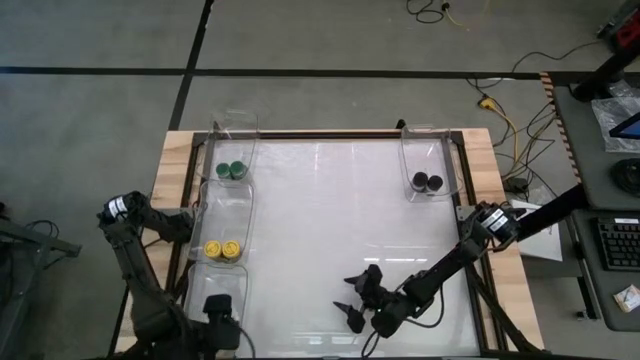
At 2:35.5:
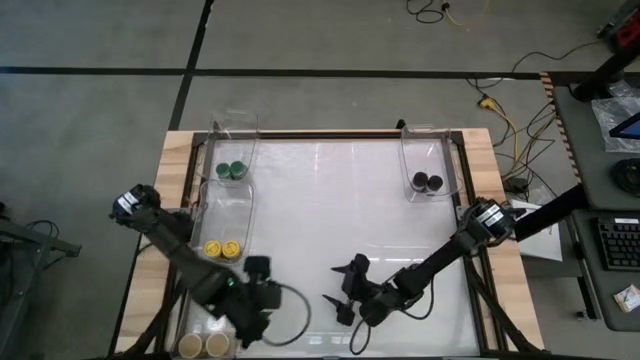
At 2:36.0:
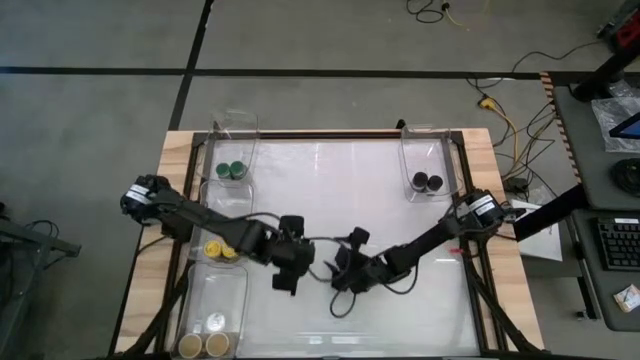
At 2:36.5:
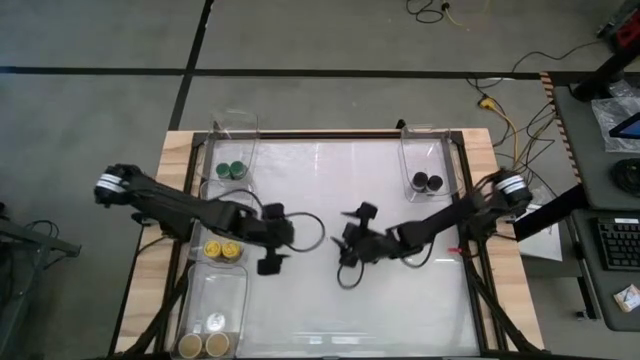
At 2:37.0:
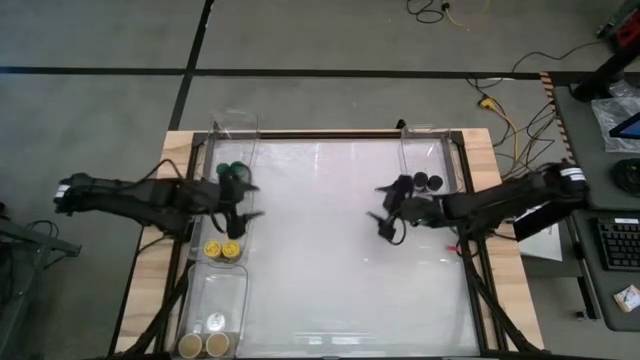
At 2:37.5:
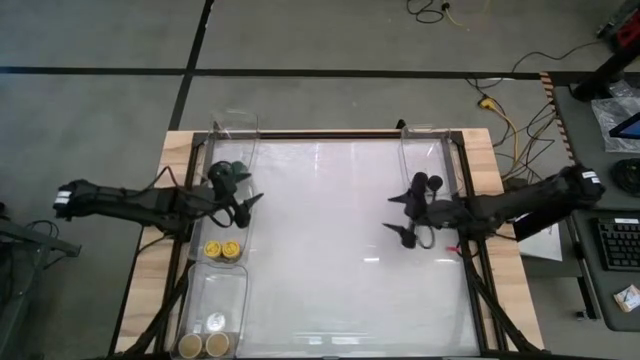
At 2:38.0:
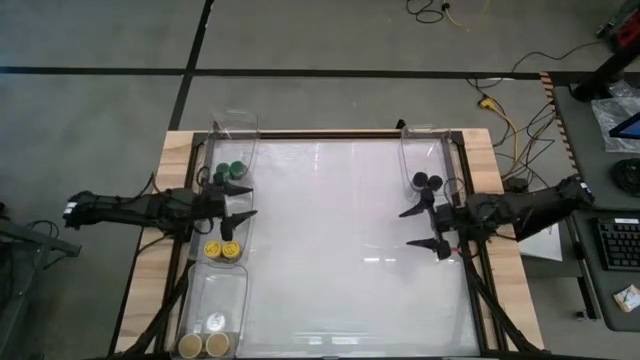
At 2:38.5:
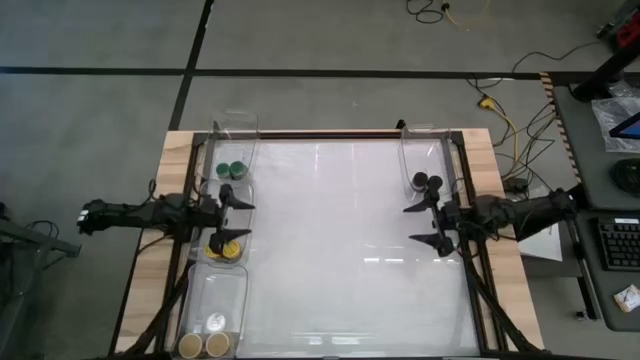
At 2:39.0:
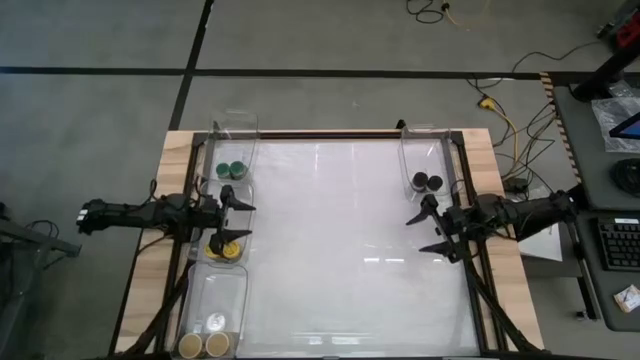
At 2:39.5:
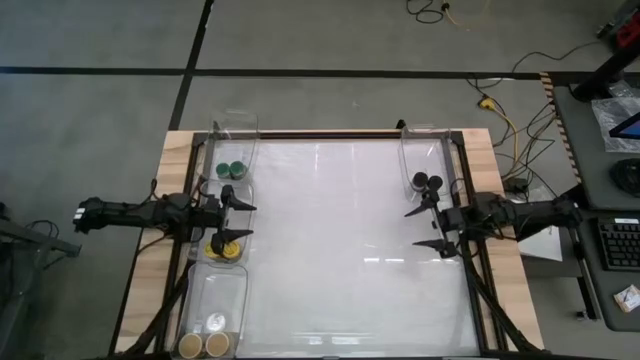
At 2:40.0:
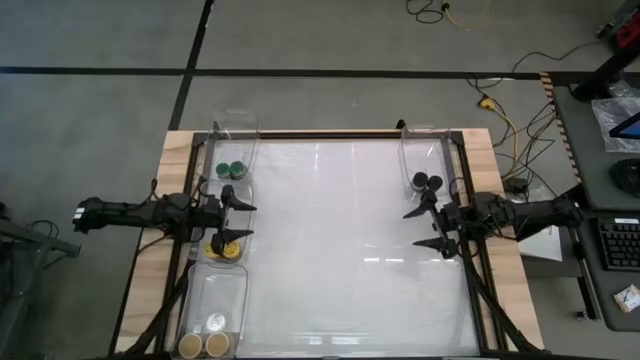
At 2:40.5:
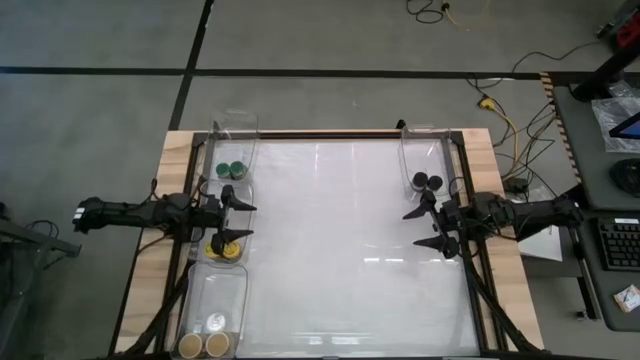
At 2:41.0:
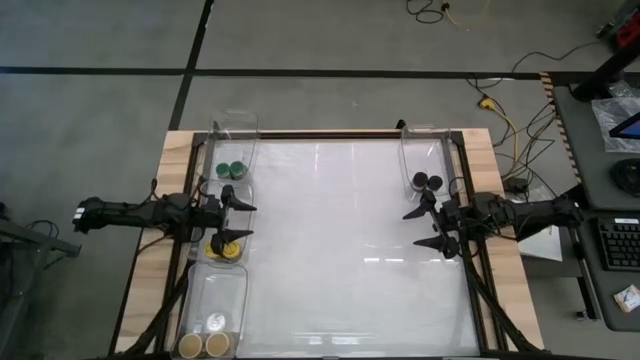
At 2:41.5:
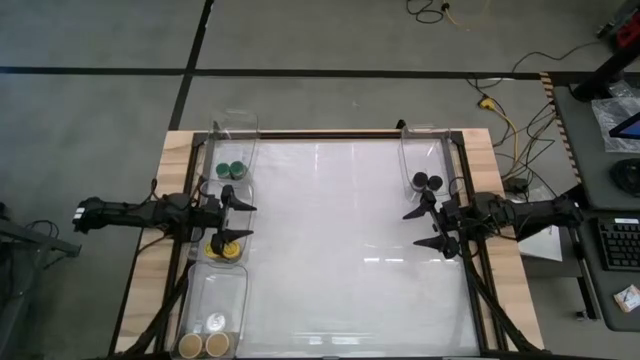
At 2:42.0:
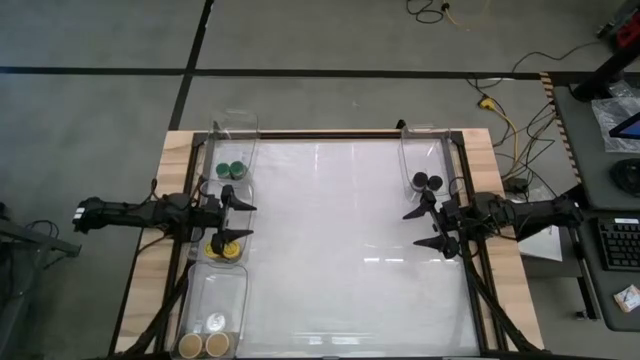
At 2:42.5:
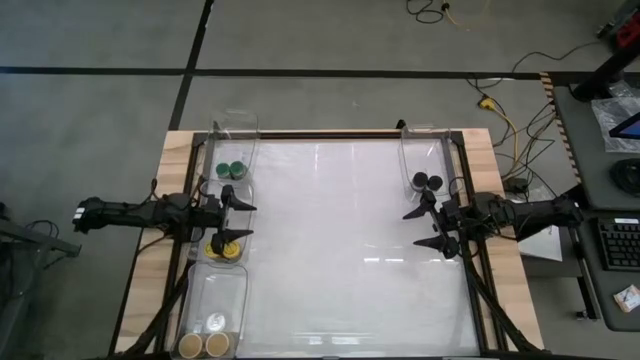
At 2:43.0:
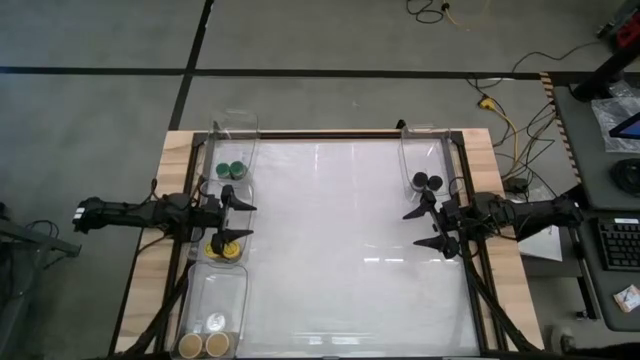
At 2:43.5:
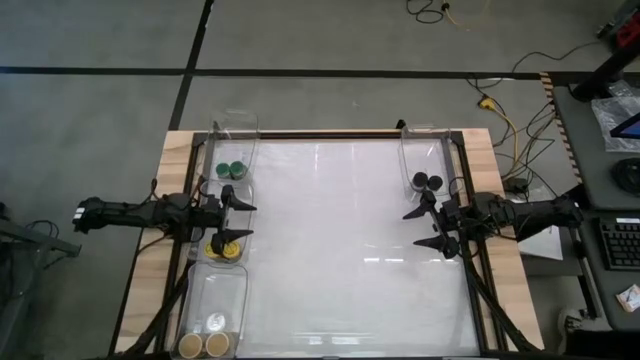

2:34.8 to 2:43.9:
Task: Sort spices by type
Return to Home Position

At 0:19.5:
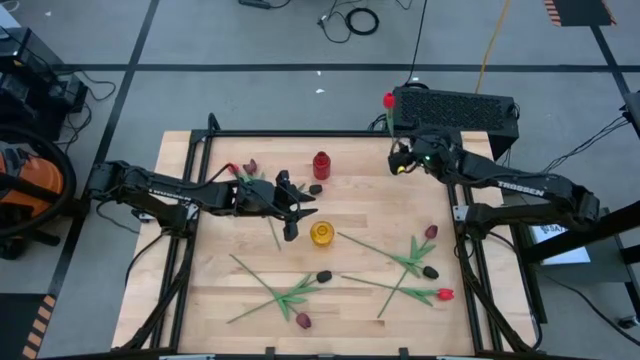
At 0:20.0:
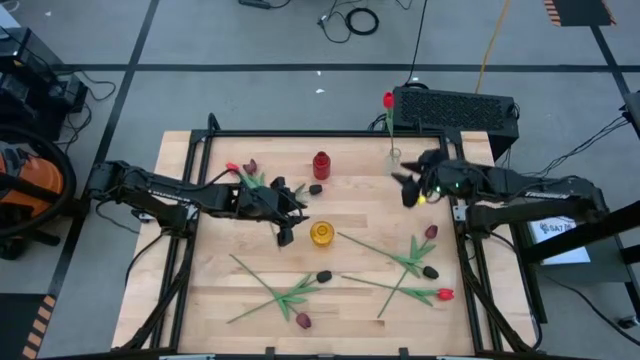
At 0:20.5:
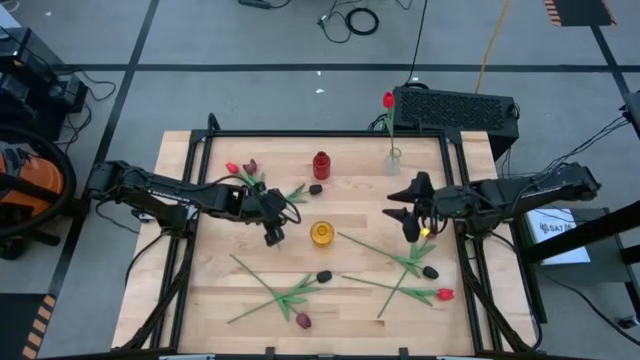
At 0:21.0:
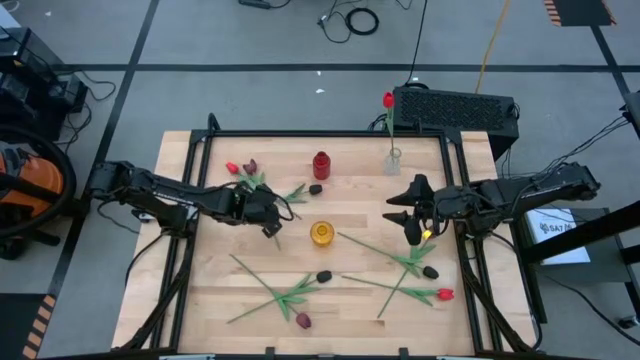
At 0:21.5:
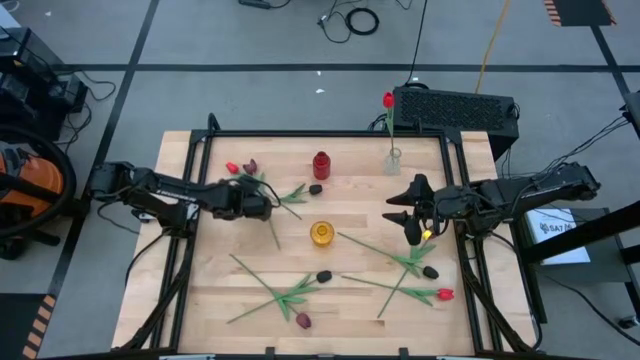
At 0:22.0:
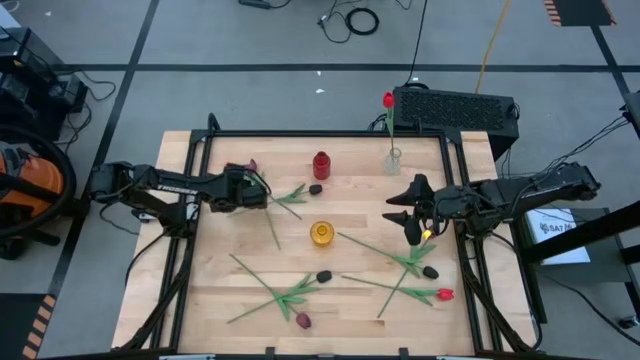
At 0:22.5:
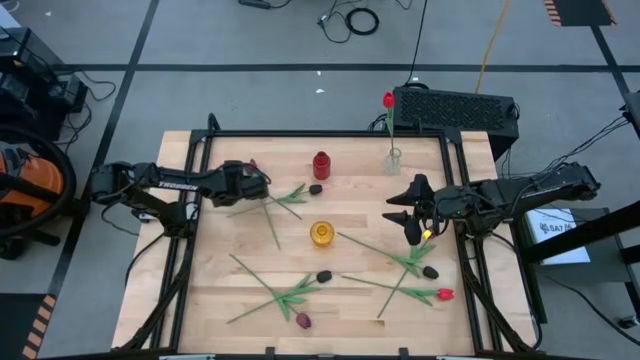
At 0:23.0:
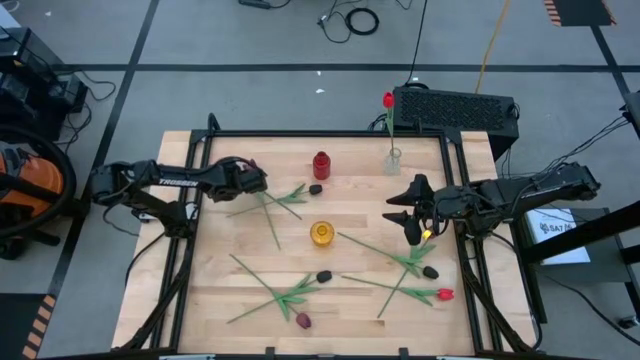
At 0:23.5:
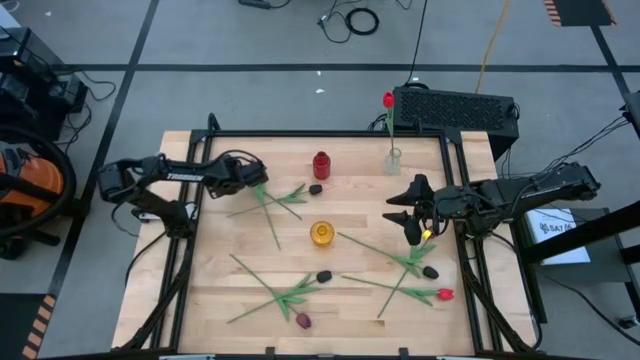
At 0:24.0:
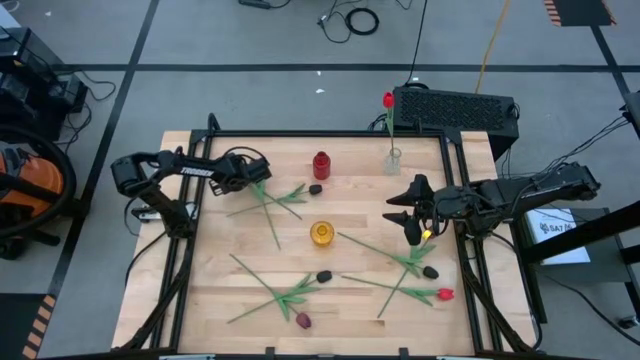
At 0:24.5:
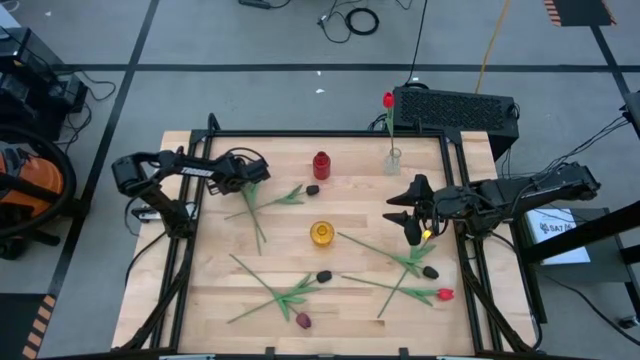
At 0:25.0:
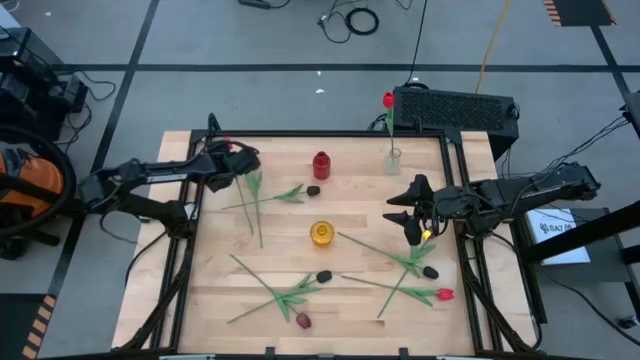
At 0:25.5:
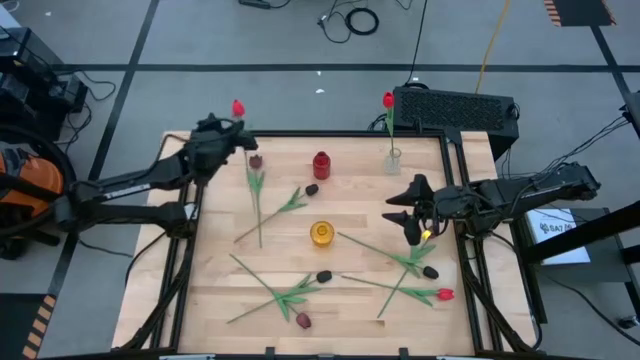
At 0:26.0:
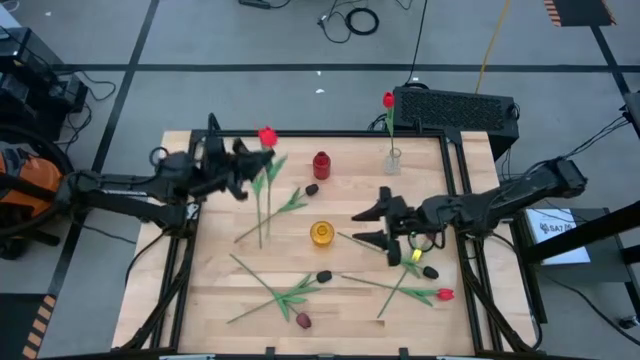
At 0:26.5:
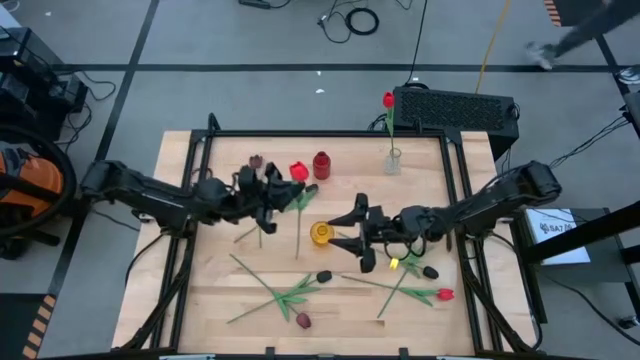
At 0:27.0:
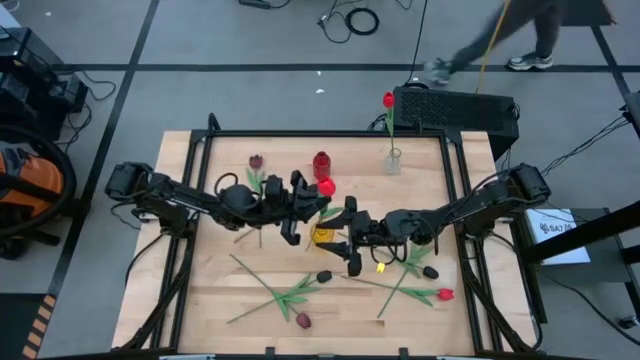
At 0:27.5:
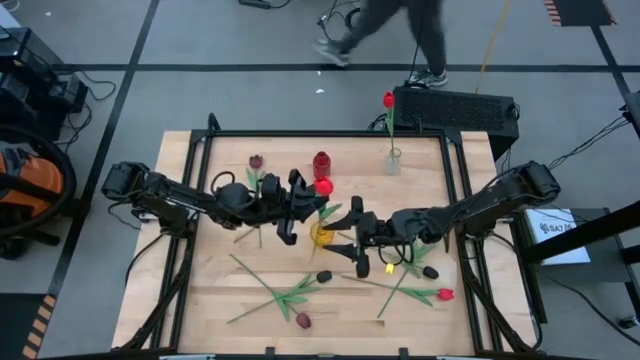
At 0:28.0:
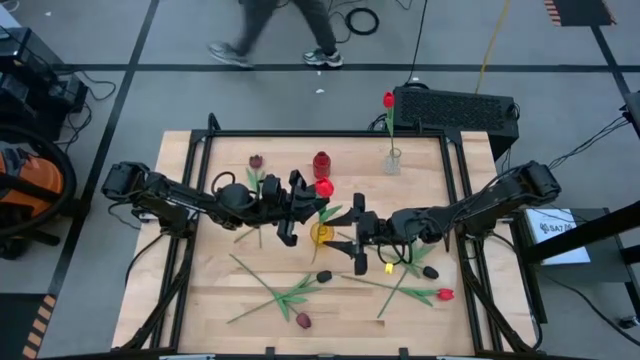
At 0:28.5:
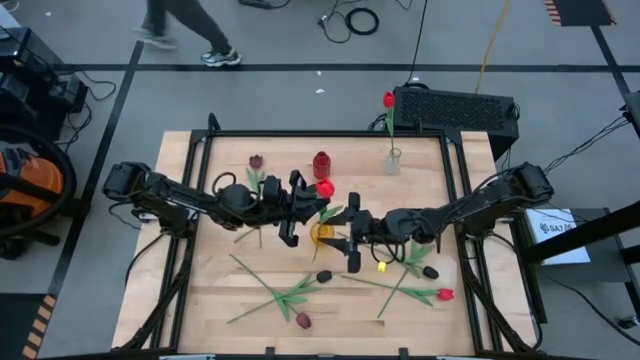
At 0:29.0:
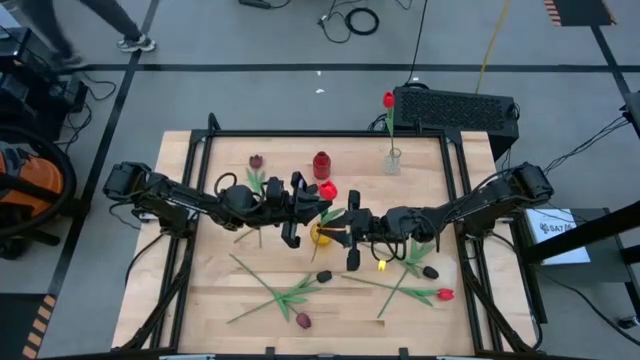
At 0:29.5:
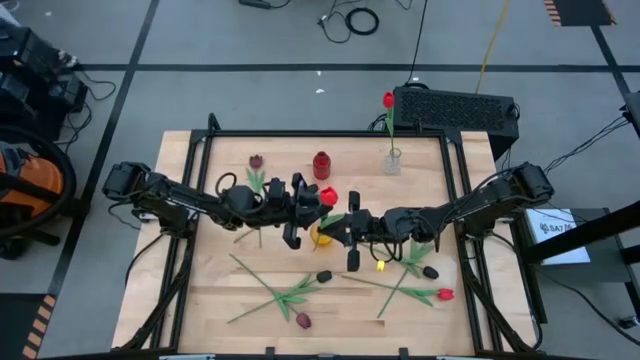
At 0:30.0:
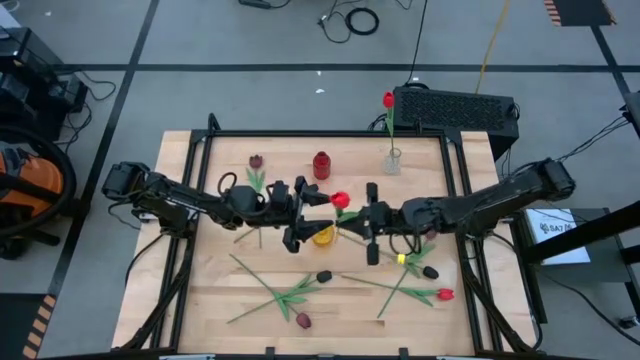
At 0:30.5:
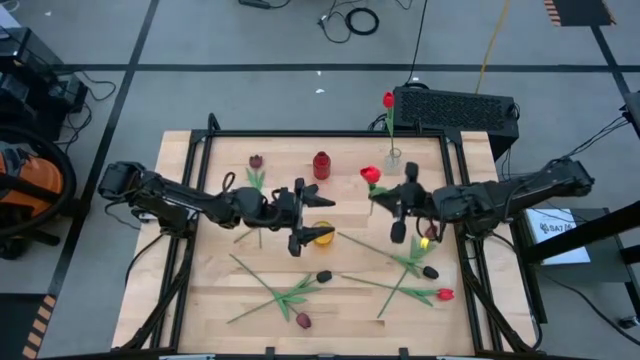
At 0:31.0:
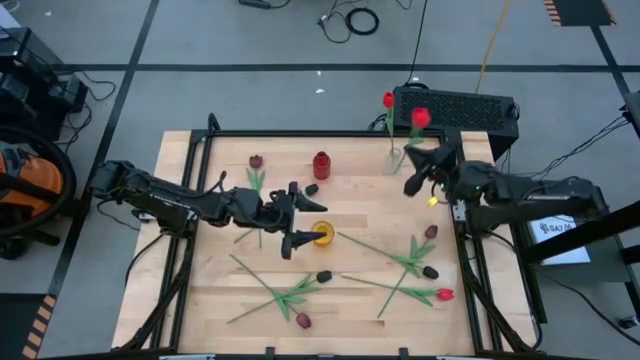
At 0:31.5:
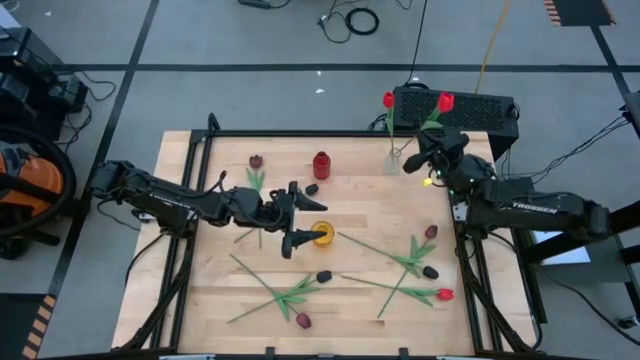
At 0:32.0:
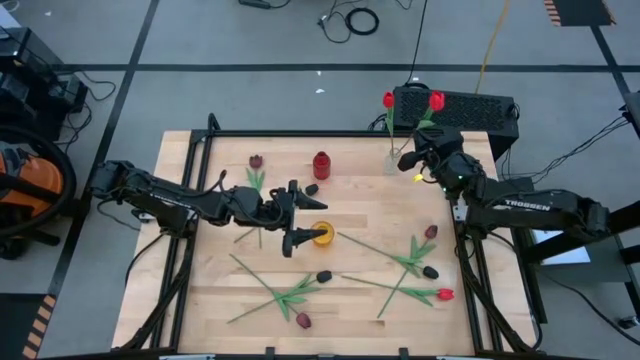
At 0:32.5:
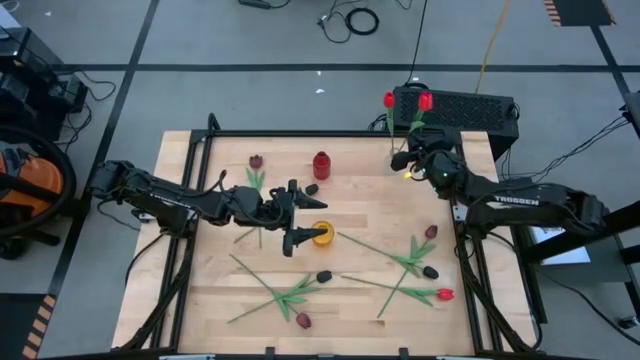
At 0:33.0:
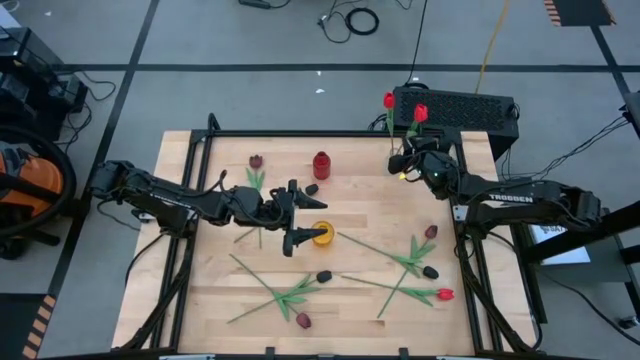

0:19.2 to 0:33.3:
Task: Sort flowers into vase by color
Put the top red flower into the transparent vase
